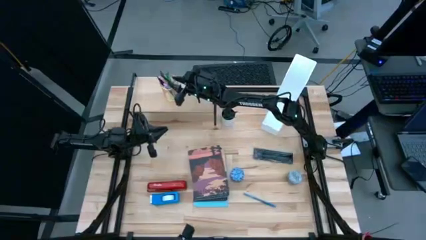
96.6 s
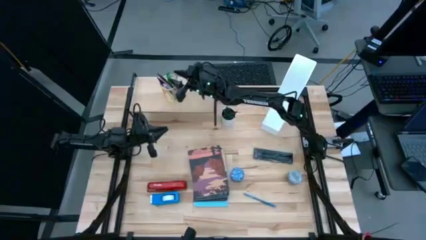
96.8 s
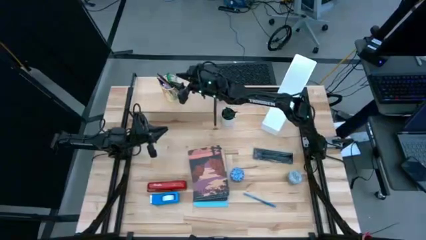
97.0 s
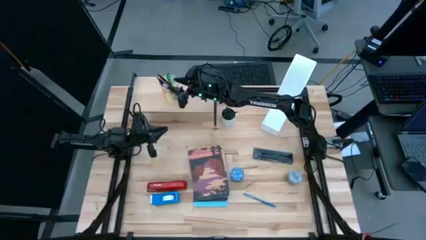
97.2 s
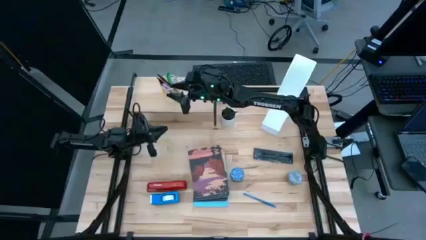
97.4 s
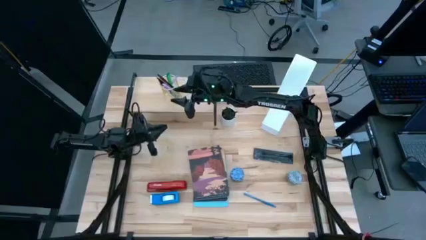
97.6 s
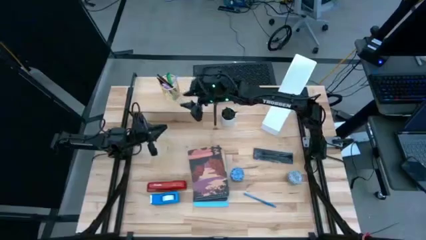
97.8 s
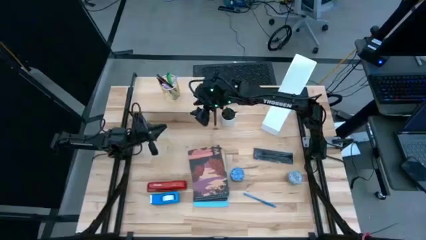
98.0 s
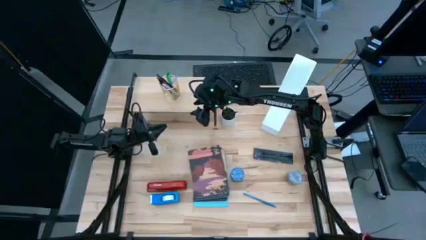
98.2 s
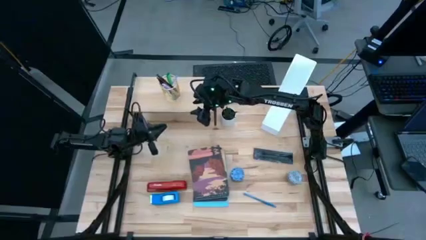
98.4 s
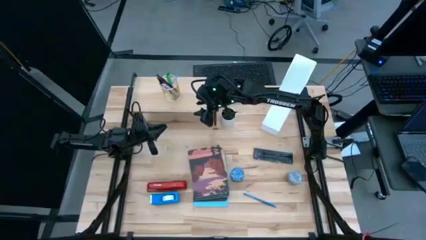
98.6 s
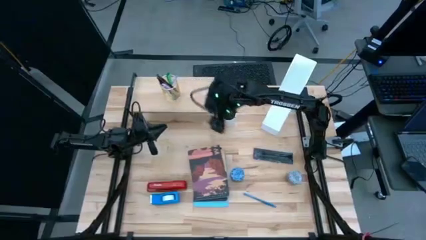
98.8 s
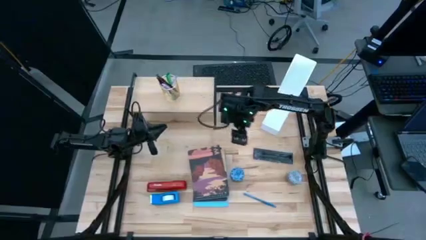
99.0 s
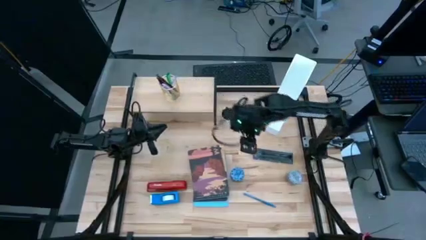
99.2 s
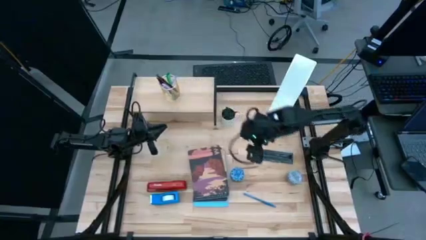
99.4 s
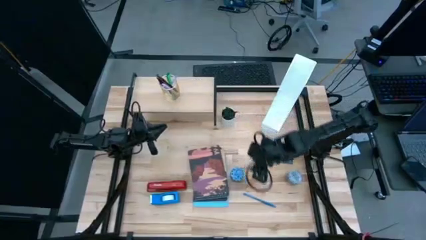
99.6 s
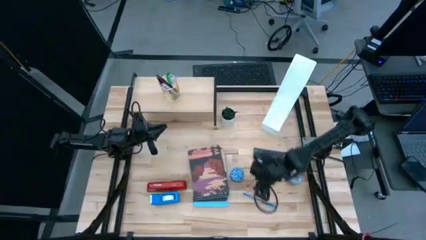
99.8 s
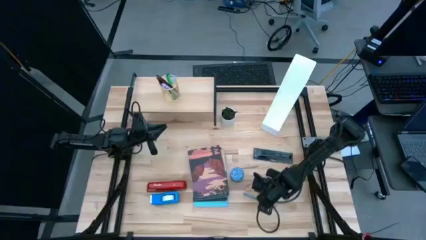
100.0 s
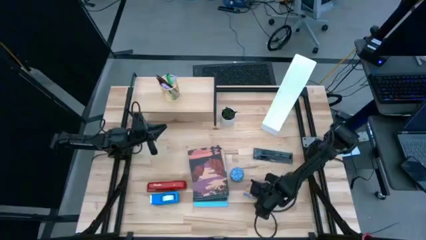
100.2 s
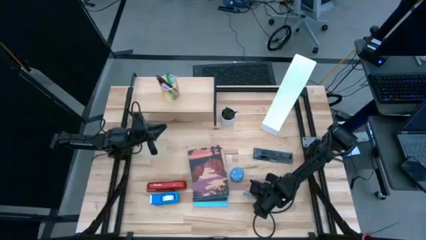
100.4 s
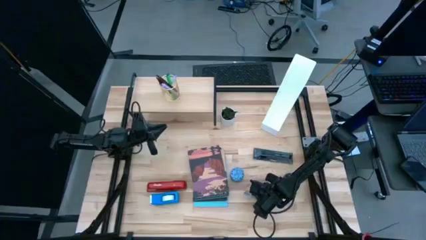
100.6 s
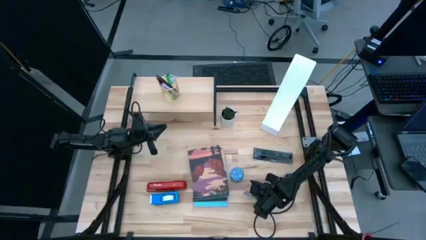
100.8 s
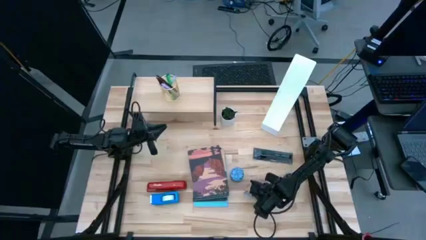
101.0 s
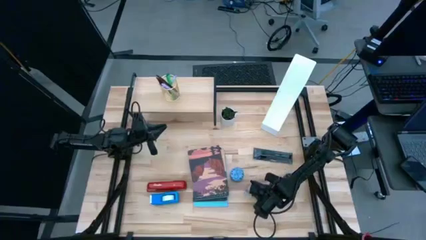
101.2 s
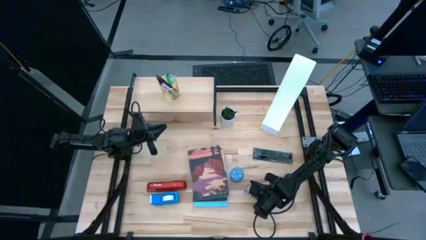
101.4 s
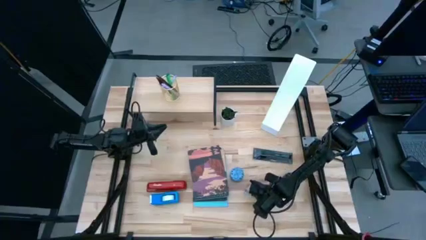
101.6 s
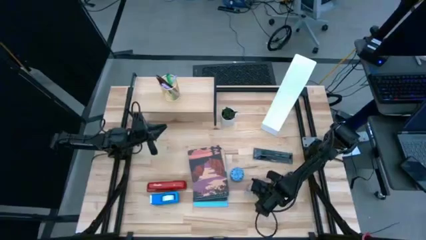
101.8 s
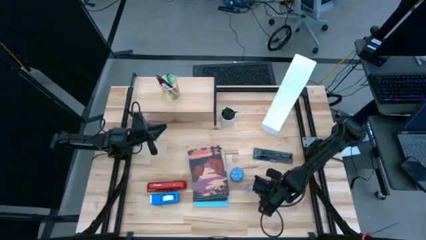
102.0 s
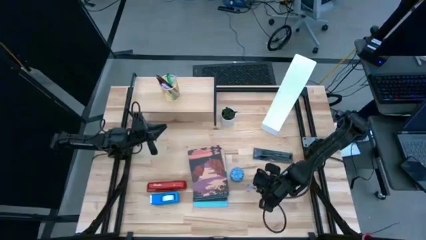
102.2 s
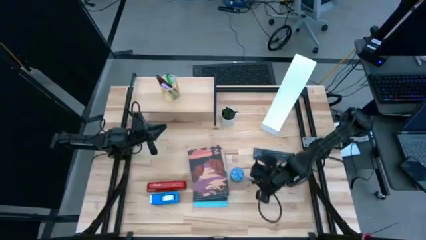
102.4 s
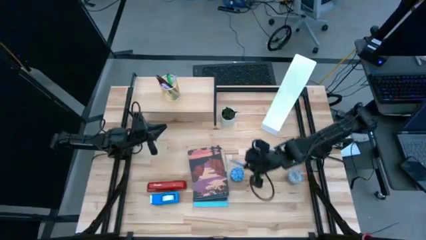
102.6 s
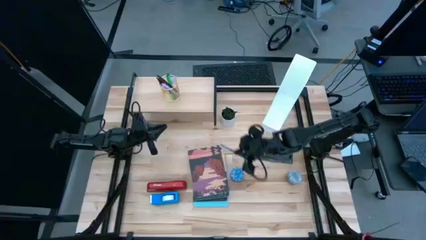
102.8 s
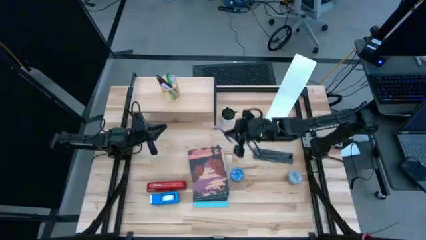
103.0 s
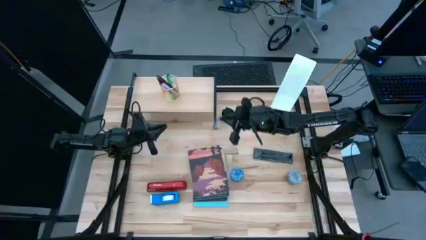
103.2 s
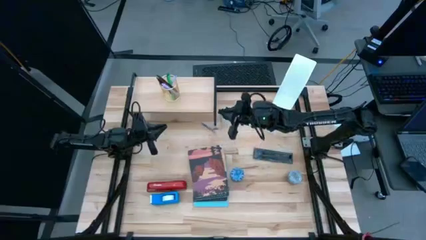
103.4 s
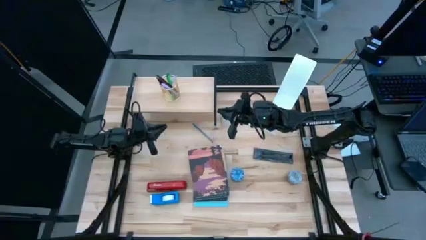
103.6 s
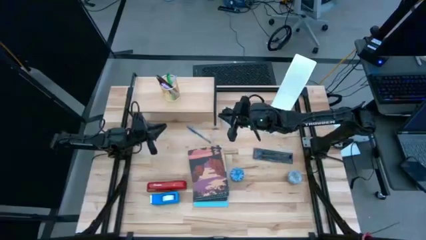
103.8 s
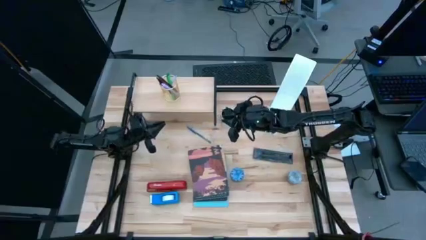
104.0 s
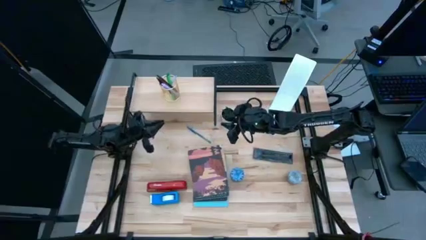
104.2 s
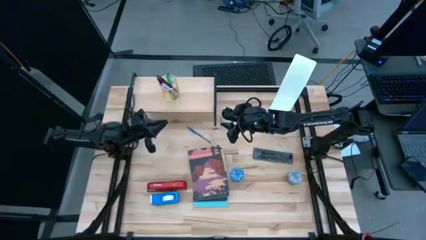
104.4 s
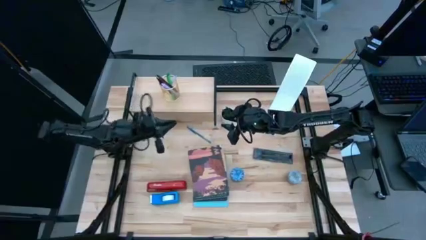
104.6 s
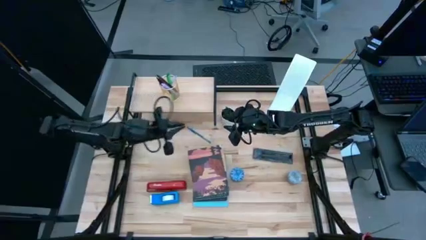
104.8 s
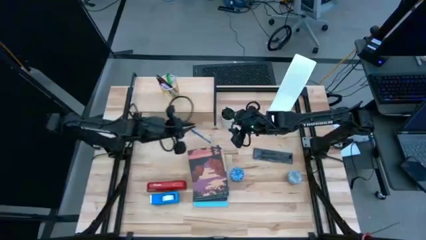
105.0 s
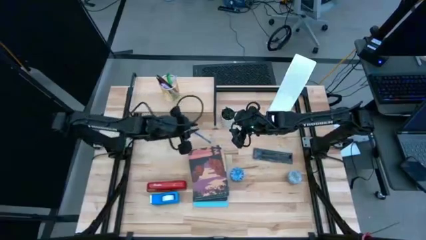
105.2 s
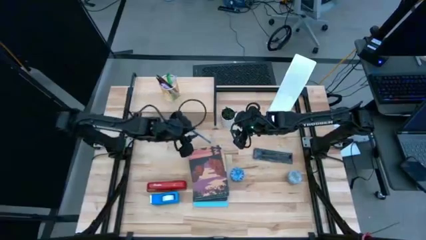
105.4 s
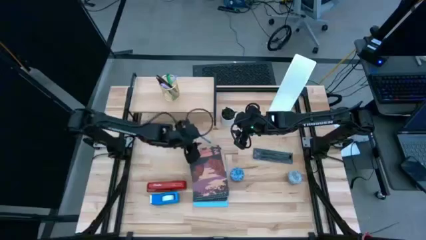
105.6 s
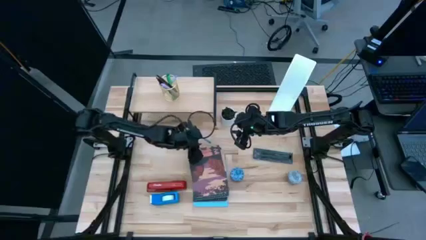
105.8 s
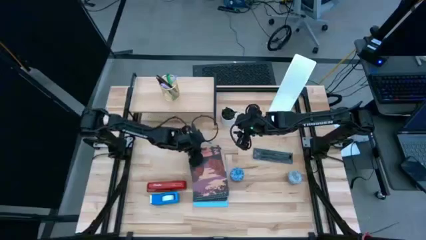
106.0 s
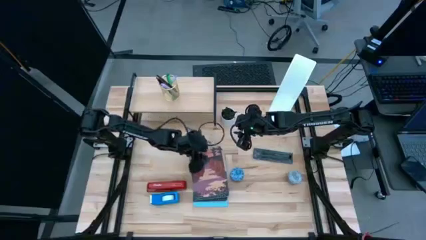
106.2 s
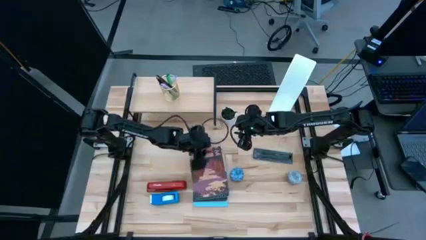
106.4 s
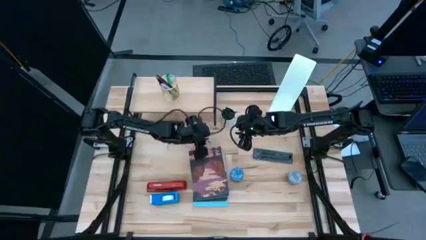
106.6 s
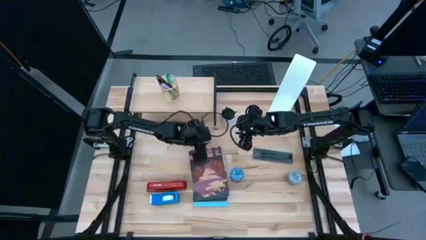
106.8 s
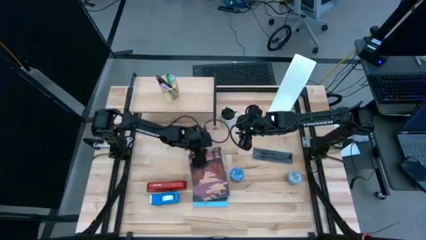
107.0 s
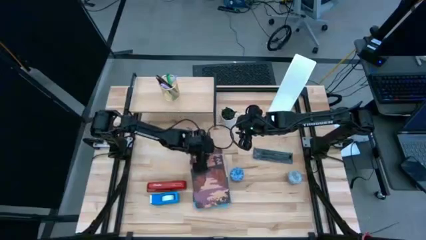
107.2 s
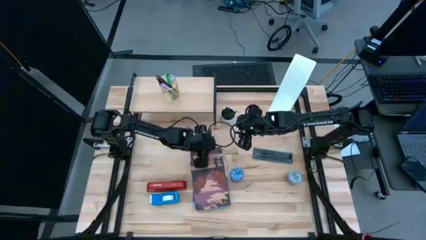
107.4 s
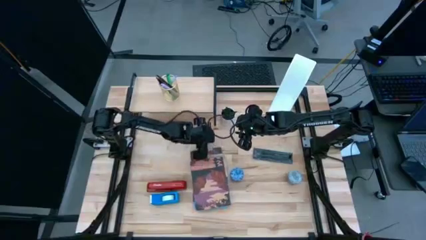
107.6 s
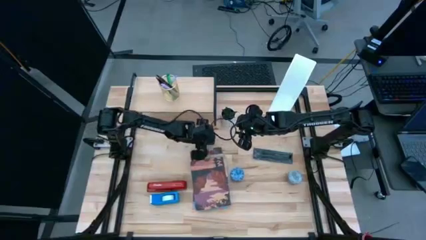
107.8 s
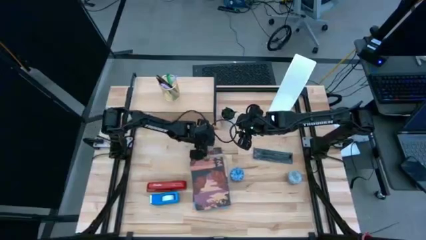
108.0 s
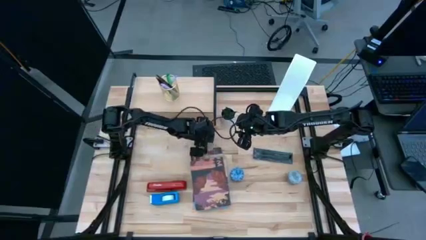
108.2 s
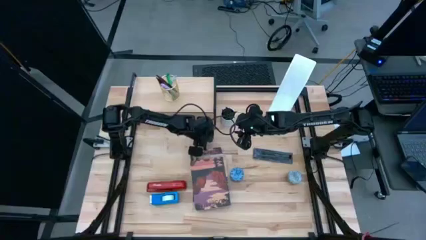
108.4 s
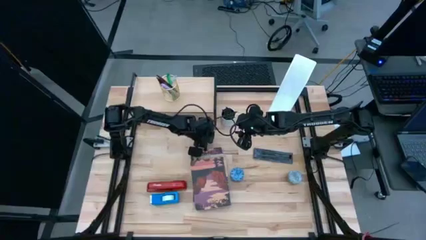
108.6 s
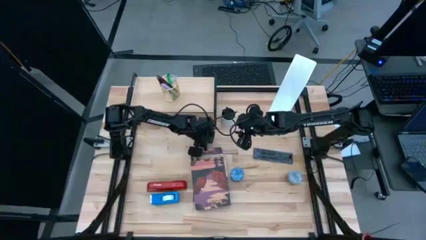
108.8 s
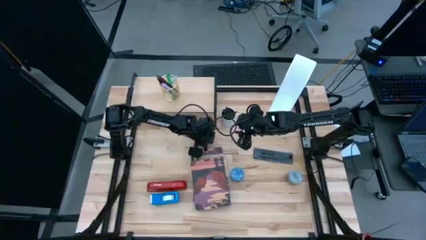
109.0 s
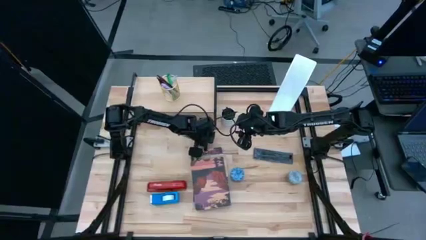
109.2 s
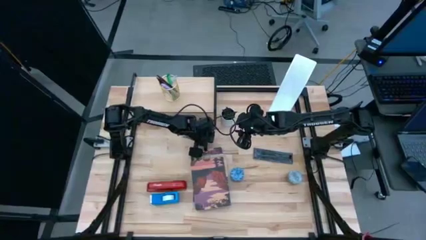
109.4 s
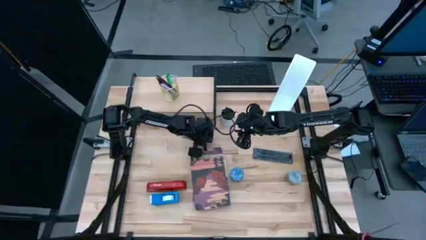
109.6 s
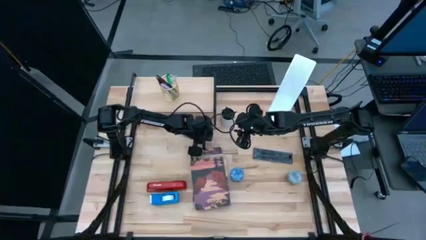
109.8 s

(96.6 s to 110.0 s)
Task: Stock shelves
Put the blue pen into the gold pen holder on the shelf

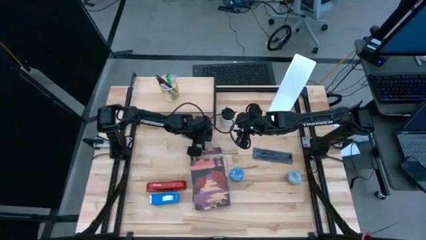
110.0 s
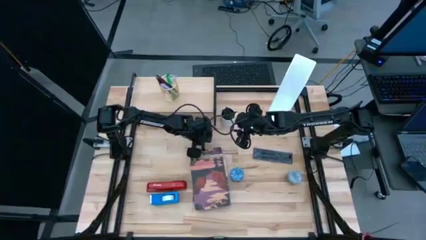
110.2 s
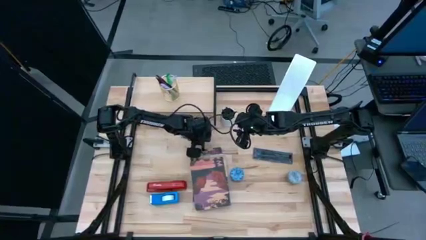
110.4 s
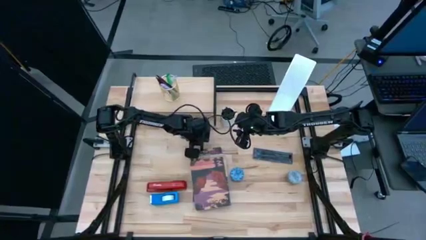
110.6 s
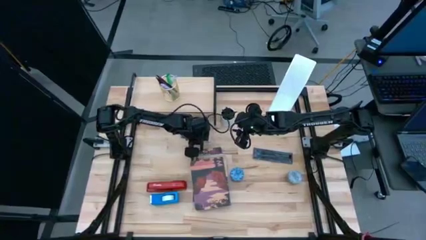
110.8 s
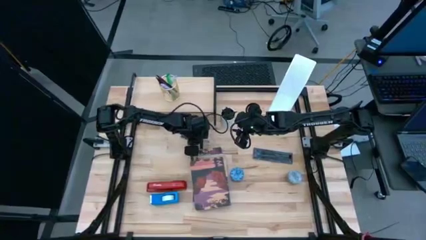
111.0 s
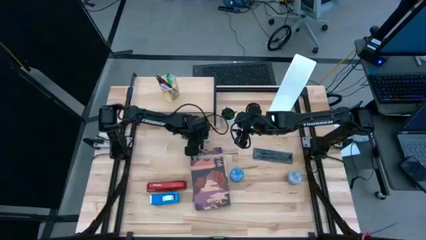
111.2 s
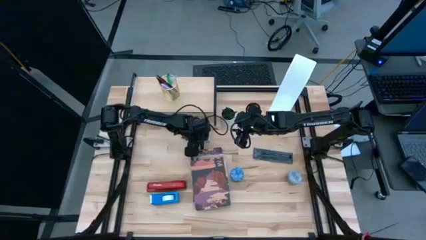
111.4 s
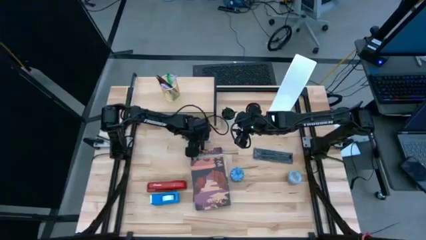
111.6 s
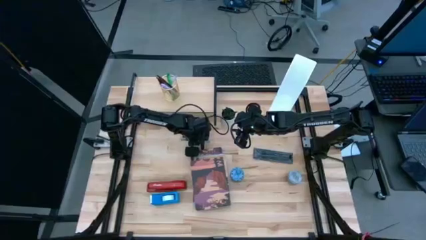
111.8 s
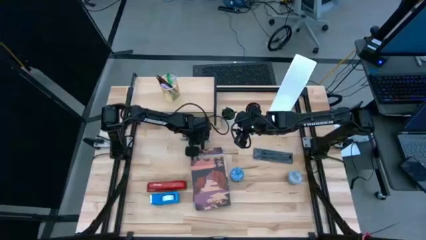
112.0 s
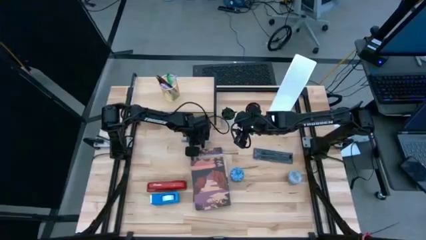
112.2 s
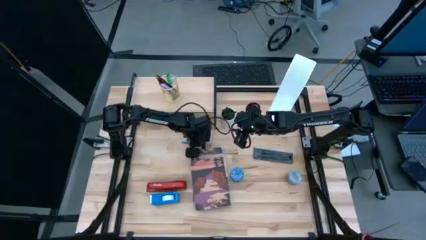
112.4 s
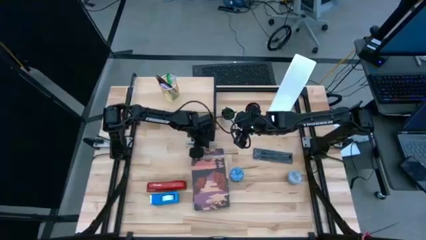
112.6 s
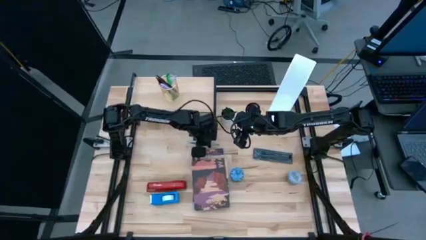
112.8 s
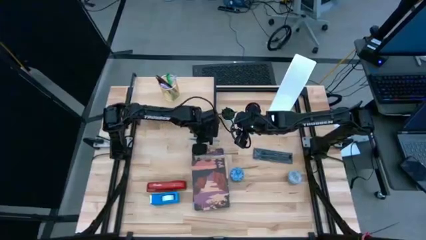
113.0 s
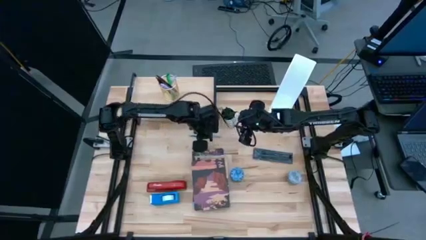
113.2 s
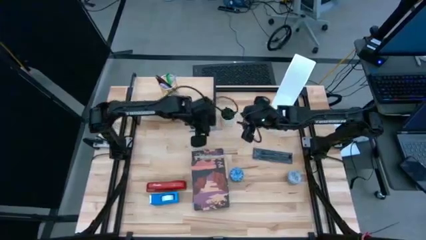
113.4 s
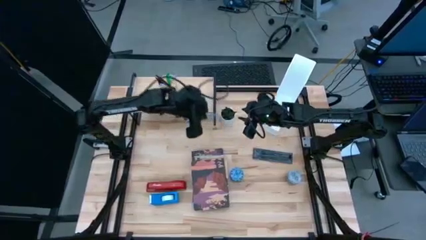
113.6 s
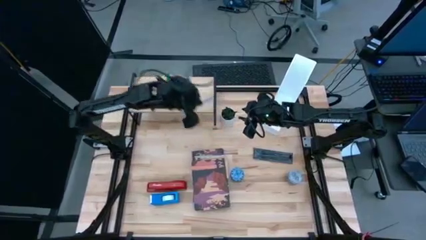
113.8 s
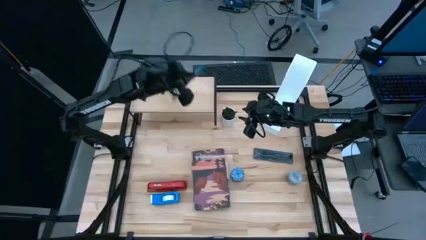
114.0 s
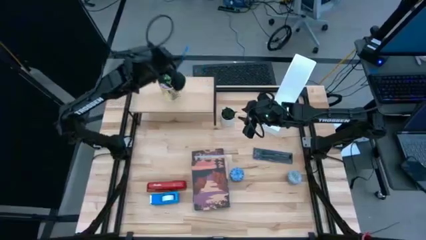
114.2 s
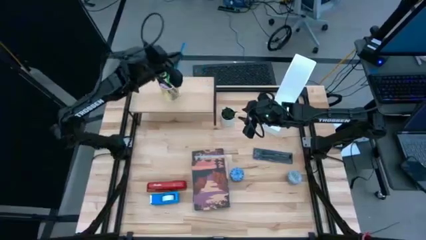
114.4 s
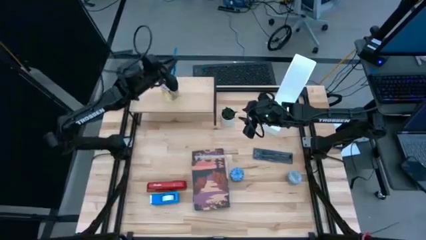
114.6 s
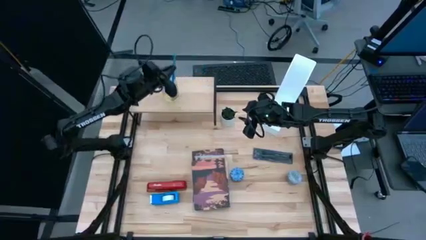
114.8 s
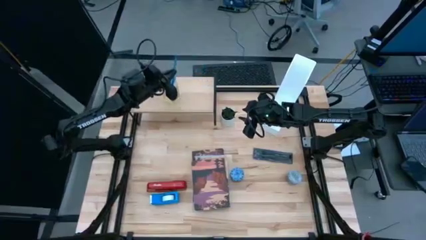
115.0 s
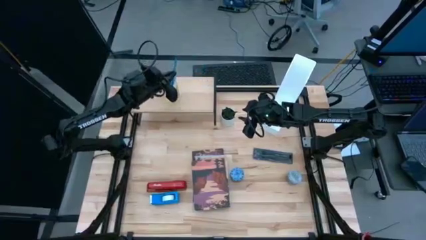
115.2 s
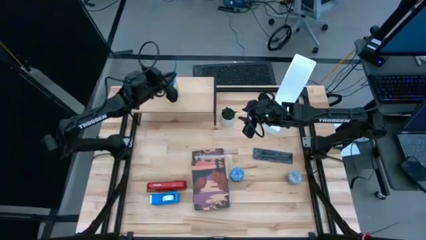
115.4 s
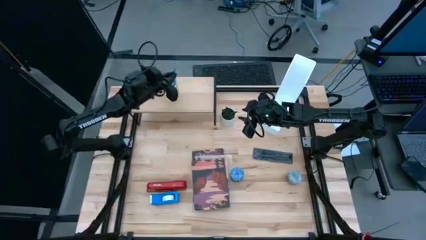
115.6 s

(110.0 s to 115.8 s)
Put the blue pen into the gold pen holder on the shelf
